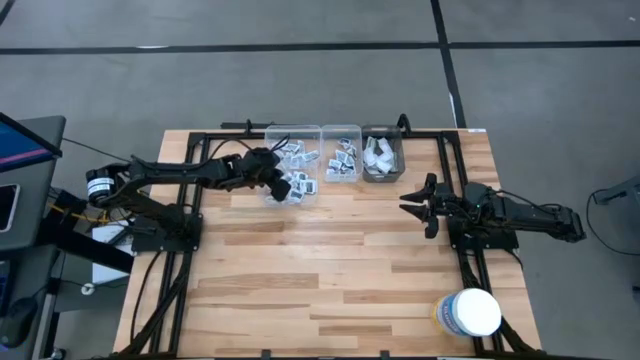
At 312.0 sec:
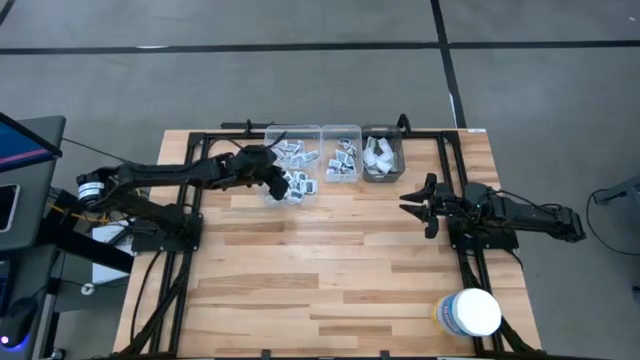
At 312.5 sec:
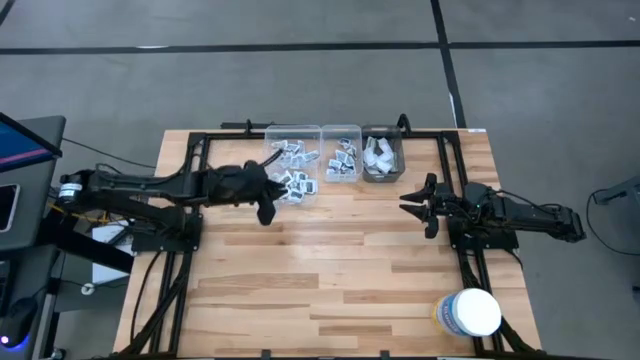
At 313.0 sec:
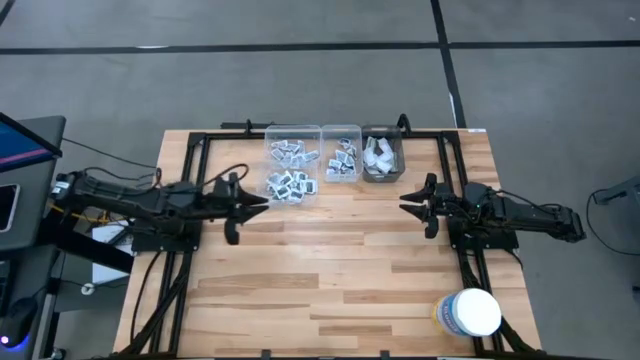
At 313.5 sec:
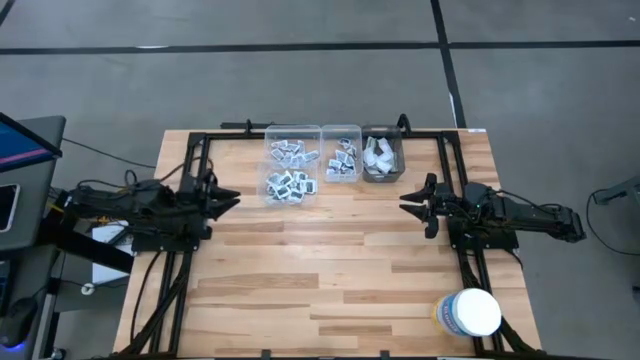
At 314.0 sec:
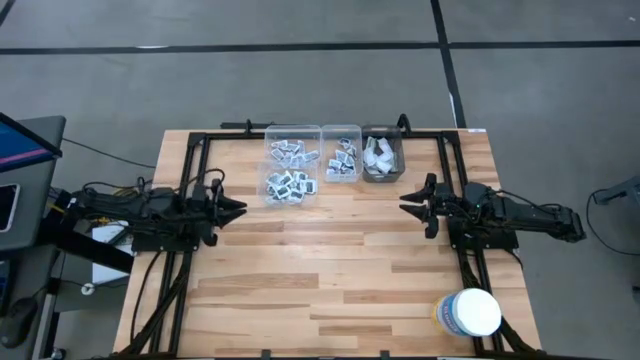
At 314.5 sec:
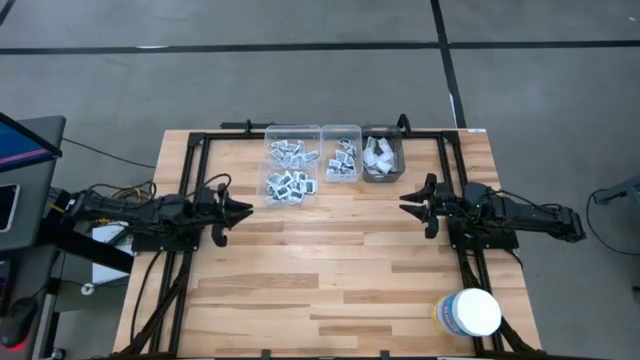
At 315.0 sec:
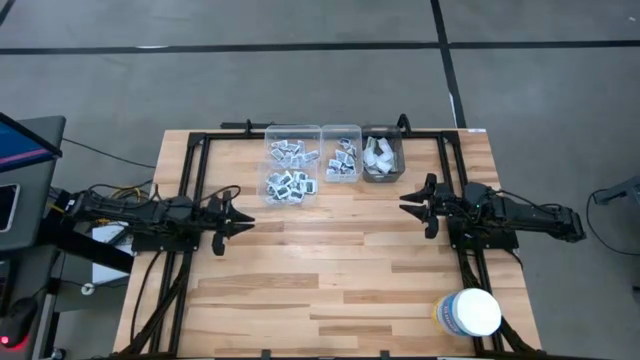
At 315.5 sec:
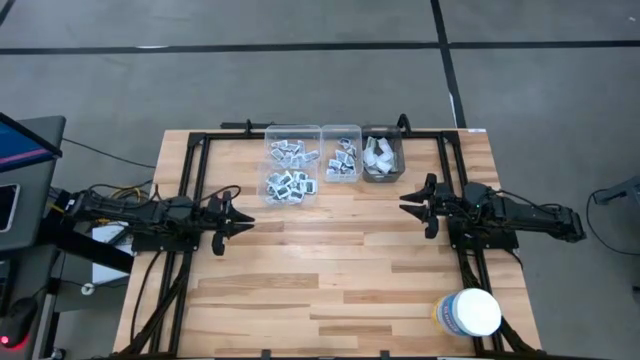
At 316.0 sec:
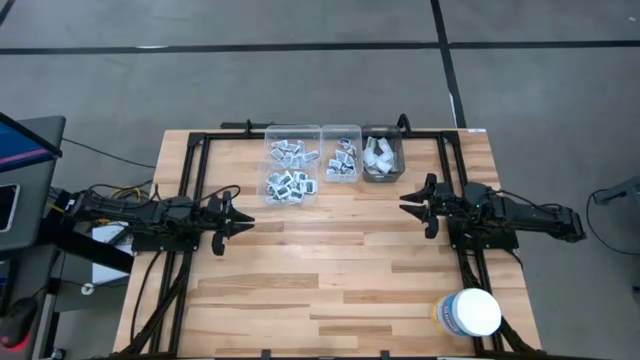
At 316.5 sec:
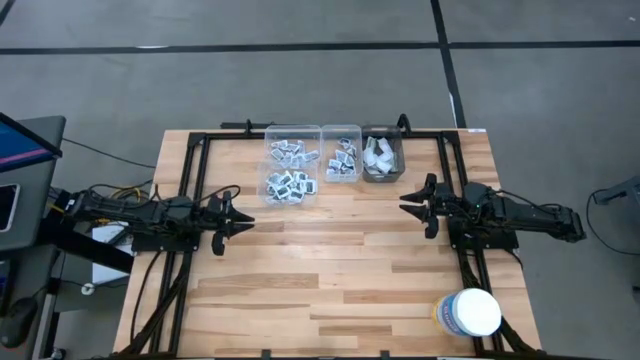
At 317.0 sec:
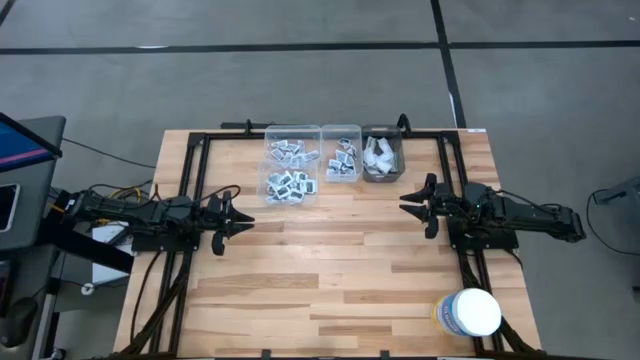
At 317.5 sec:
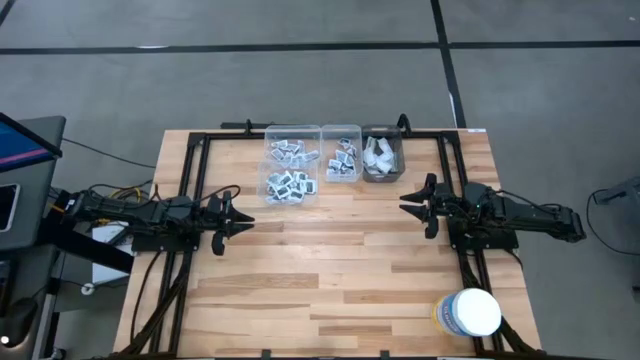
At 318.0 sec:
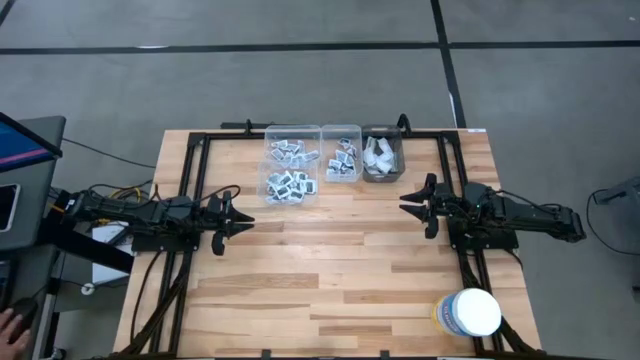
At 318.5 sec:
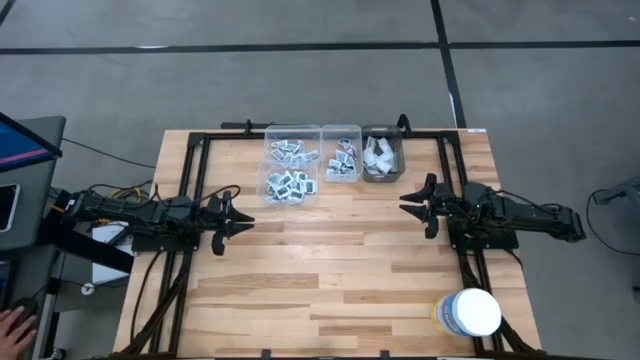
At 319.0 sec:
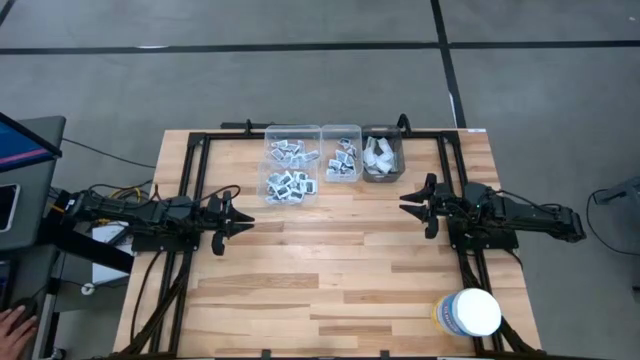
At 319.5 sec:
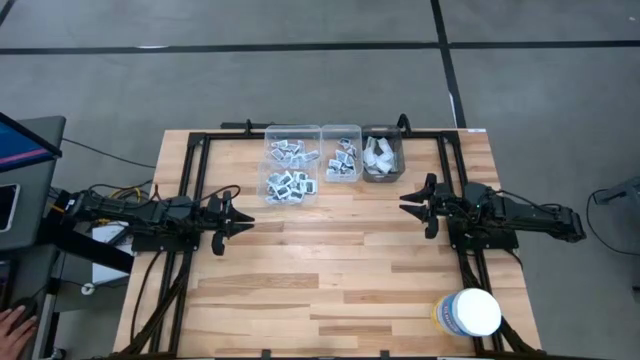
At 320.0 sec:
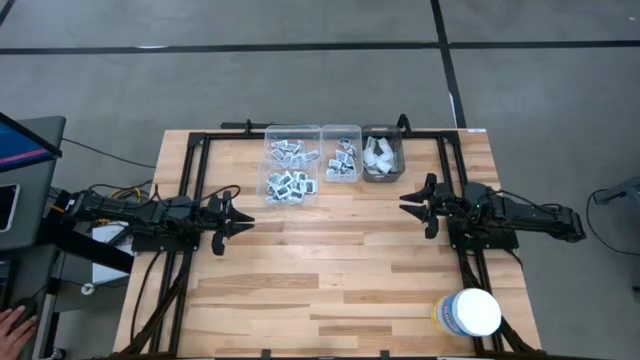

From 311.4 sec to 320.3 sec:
Task: Pick & Place First Aid Supplies
Return to Home Position

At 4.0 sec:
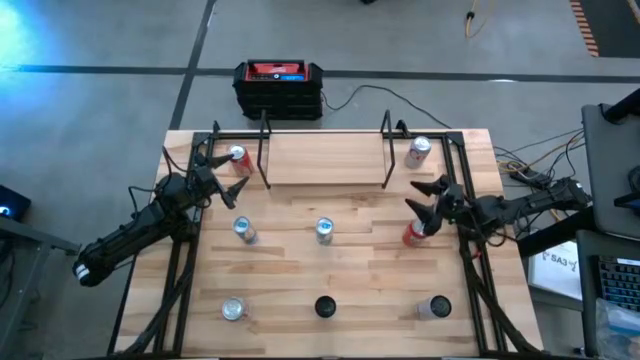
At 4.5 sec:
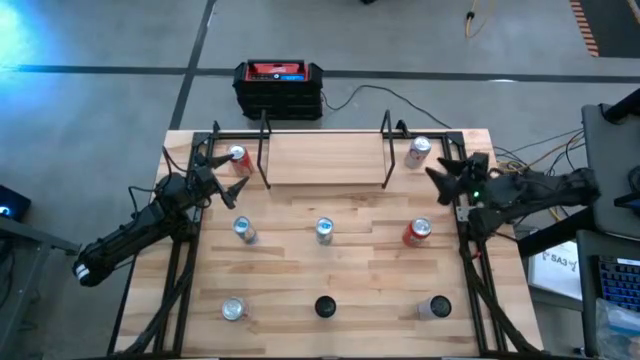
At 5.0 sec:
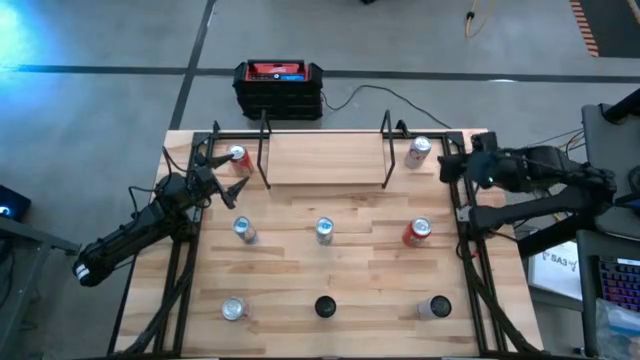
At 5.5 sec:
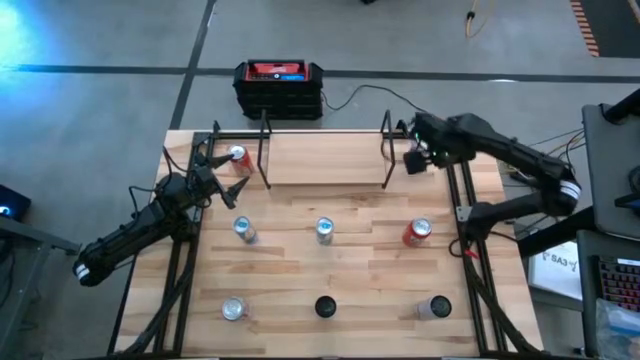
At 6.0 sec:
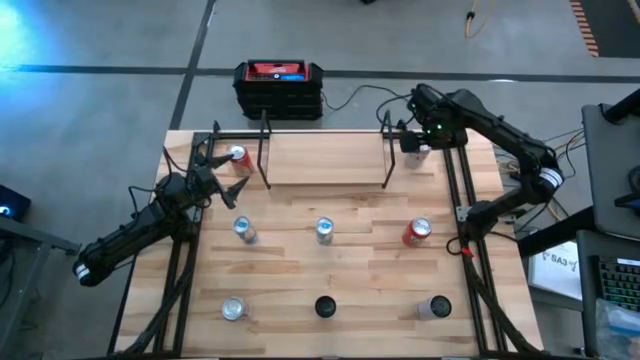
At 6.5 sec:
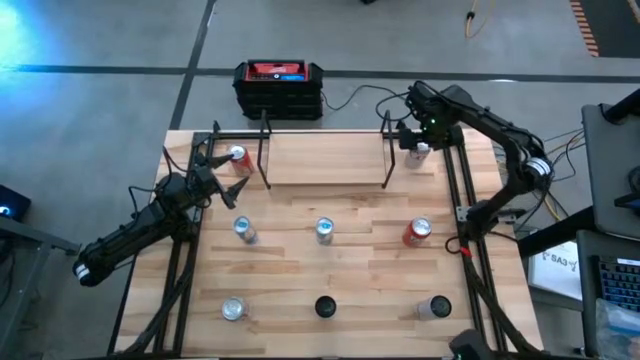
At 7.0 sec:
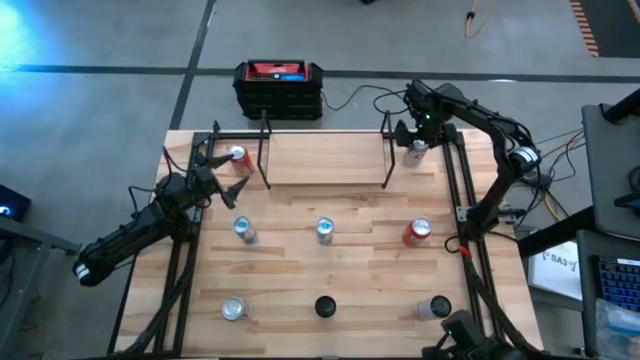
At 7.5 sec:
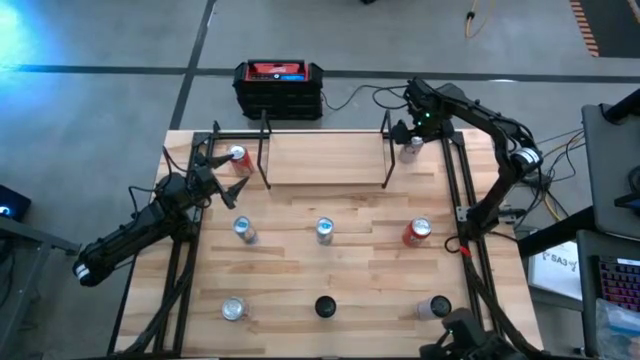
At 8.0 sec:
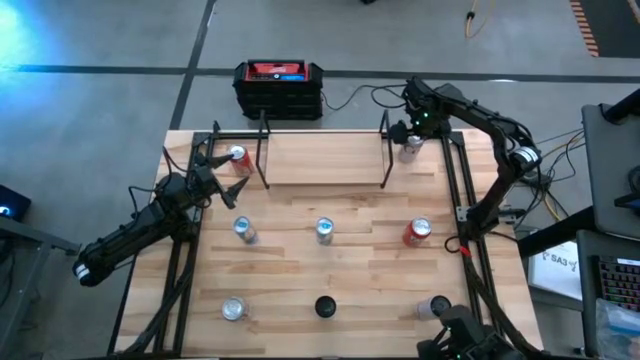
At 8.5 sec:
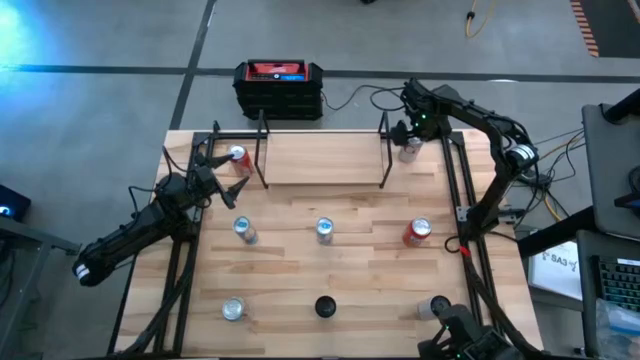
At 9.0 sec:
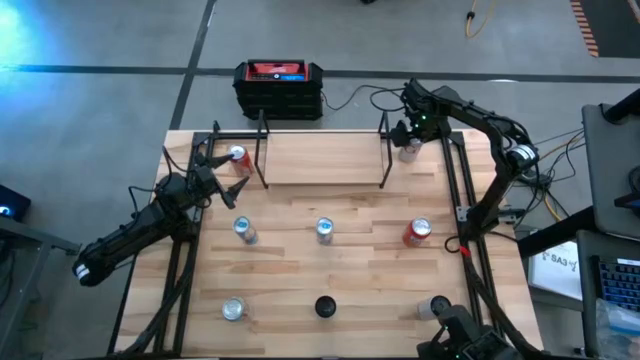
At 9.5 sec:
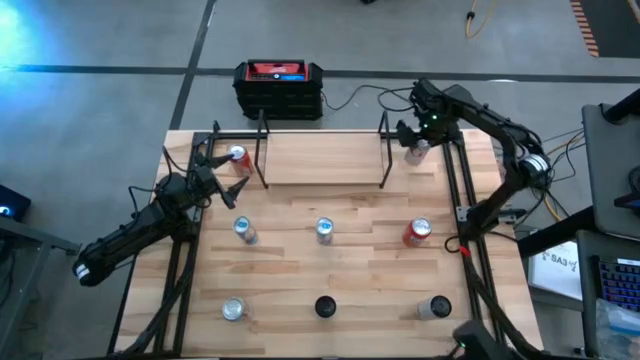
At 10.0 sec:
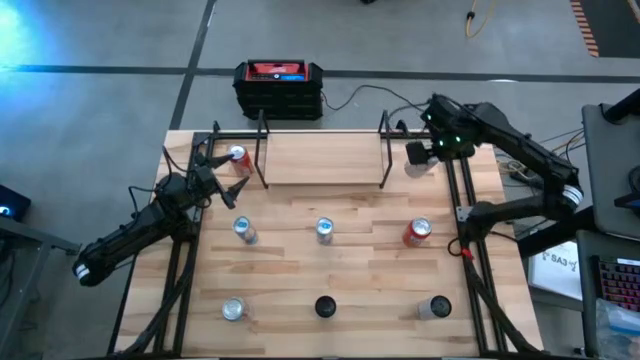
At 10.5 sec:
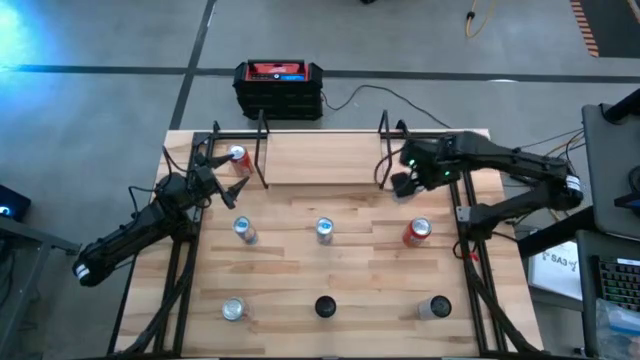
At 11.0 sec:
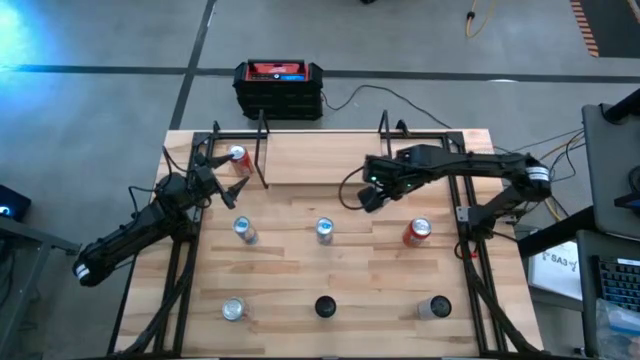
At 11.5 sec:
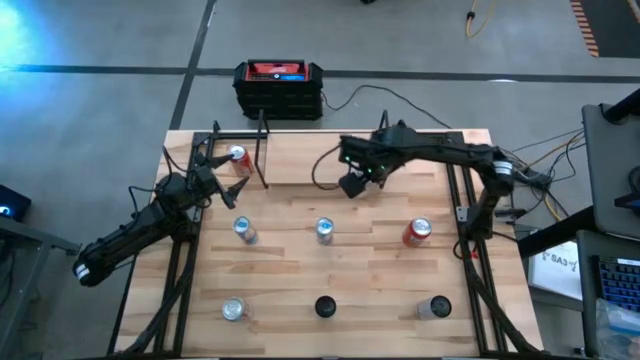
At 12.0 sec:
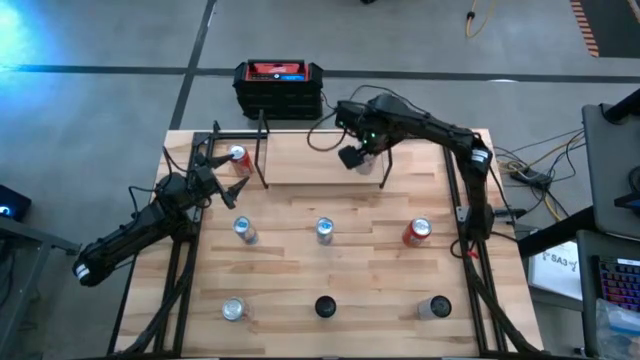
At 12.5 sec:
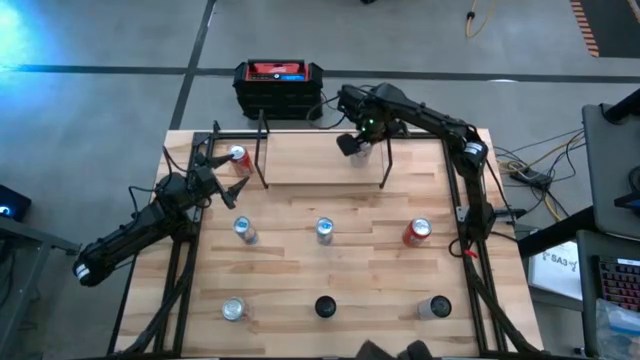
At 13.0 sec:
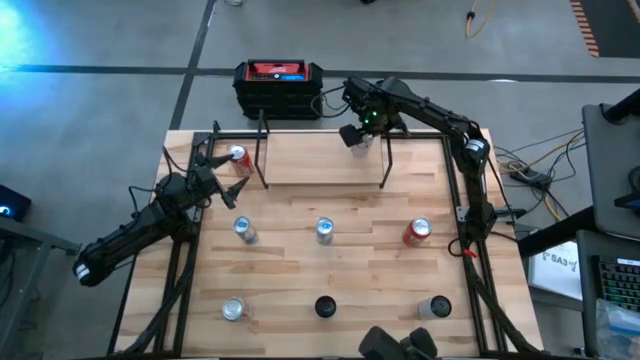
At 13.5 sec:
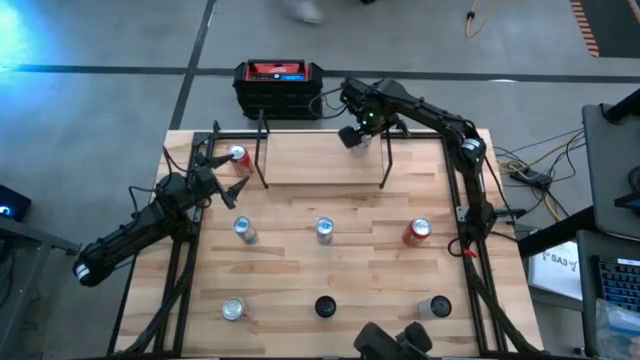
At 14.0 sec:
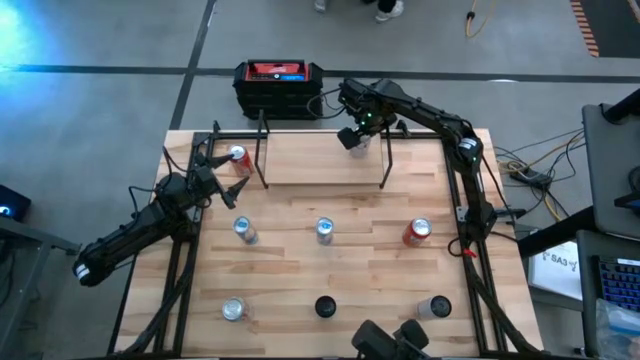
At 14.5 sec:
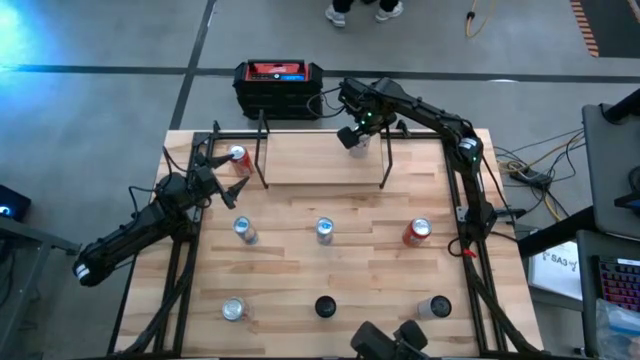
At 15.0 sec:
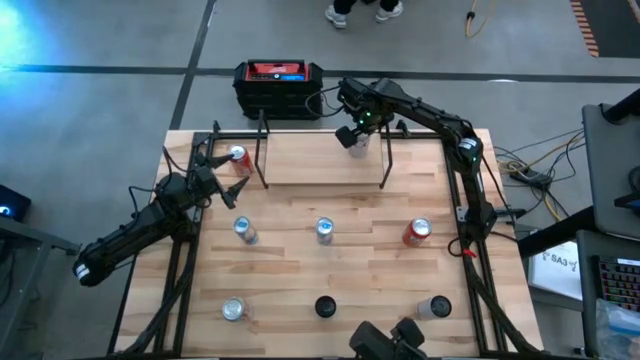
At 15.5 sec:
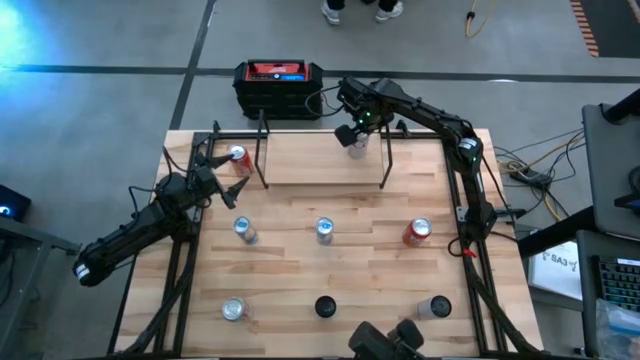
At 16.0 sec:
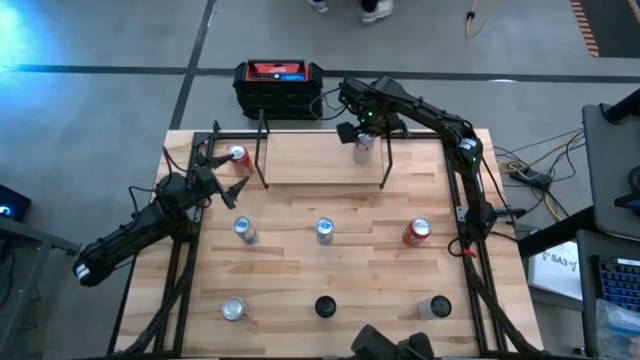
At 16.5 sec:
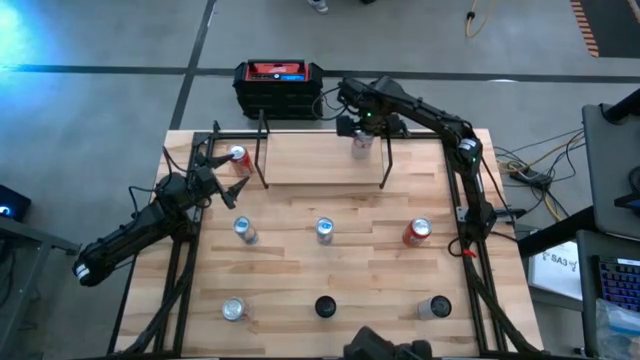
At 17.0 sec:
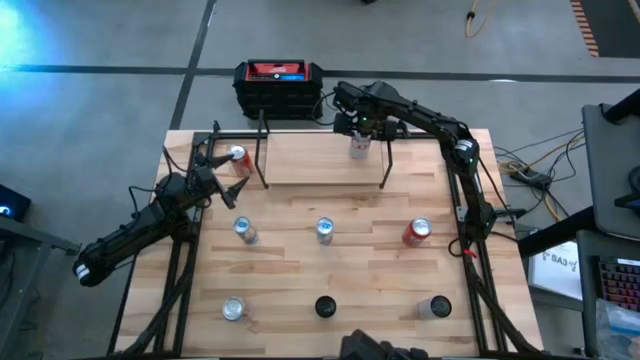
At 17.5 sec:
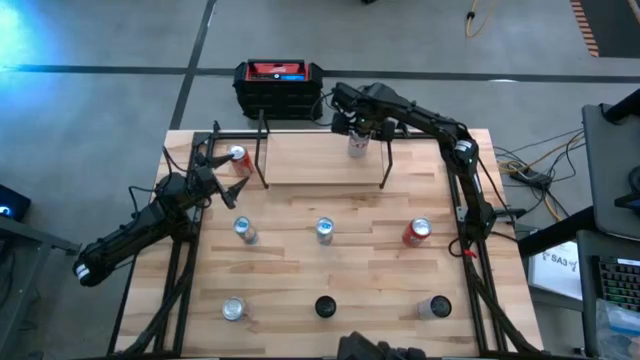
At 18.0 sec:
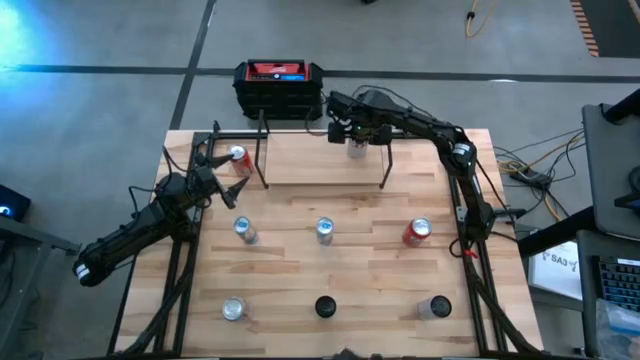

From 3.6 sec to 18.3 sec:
Task: Place canned beverage on shelf
Put the top red silver soda can on the shelf
